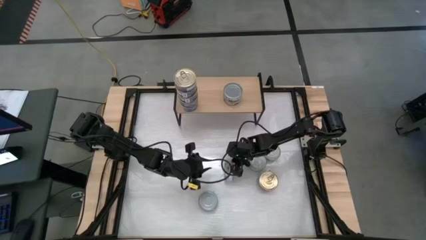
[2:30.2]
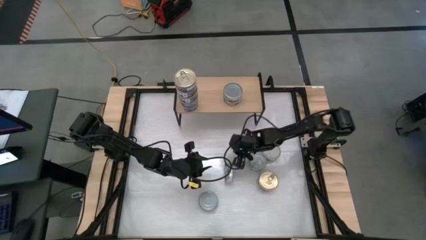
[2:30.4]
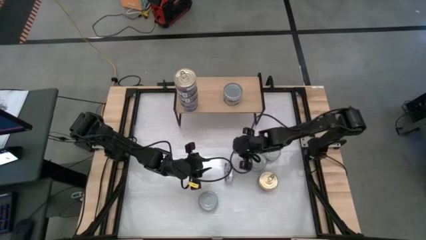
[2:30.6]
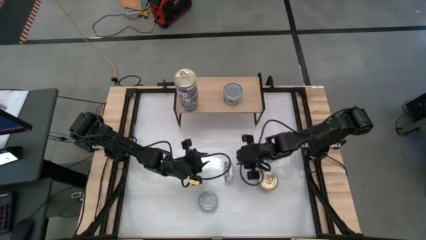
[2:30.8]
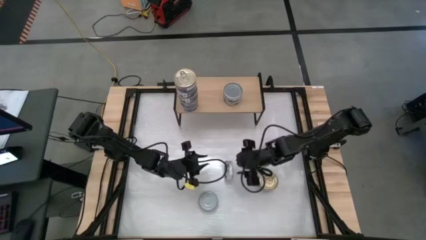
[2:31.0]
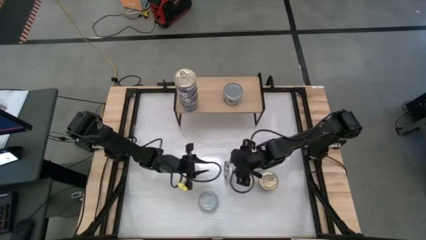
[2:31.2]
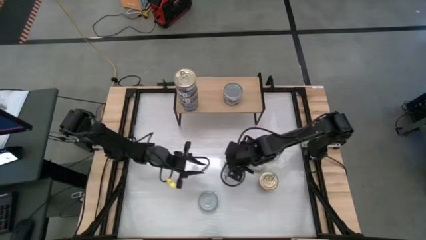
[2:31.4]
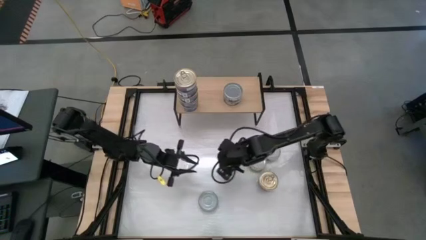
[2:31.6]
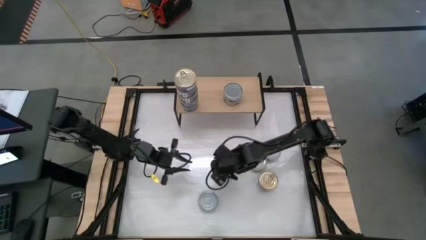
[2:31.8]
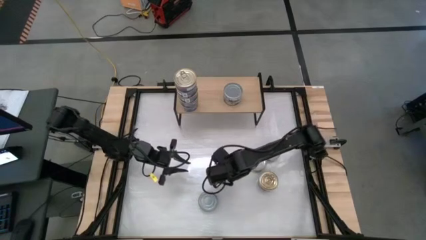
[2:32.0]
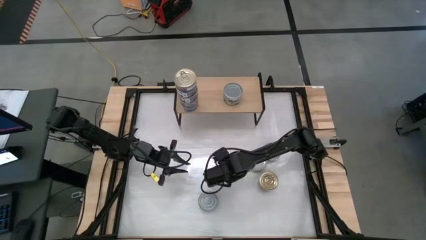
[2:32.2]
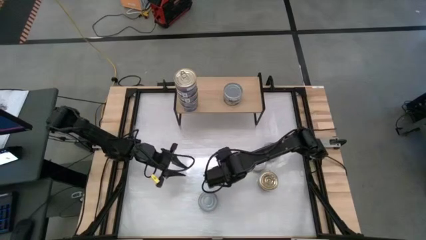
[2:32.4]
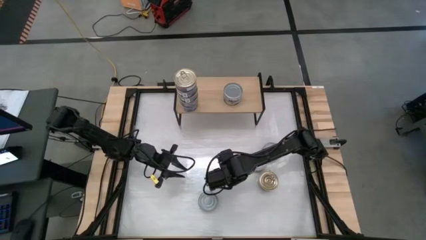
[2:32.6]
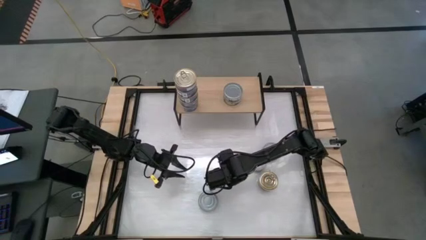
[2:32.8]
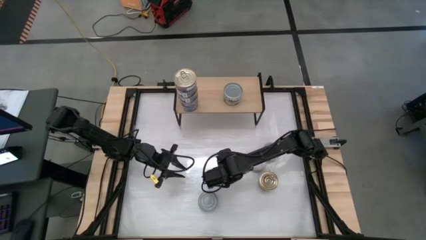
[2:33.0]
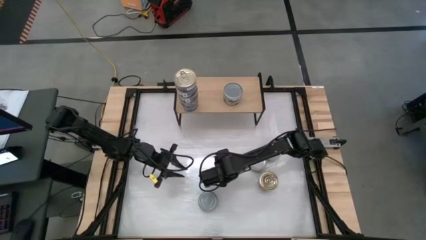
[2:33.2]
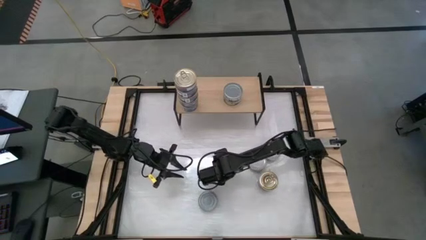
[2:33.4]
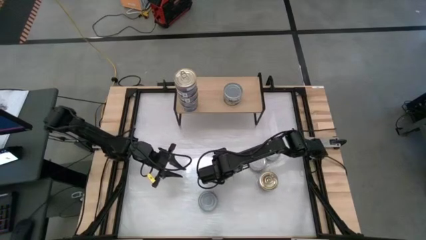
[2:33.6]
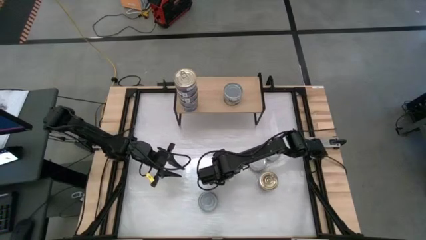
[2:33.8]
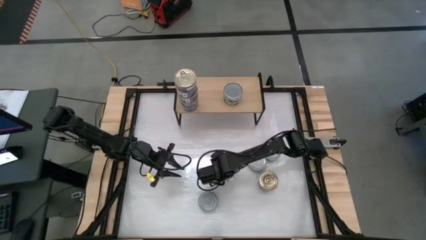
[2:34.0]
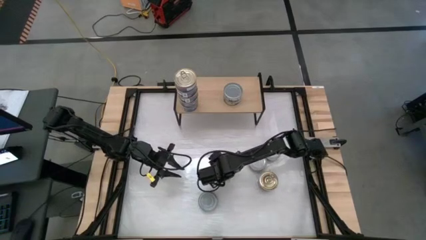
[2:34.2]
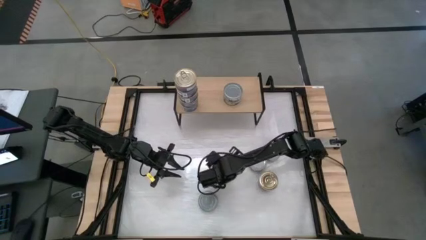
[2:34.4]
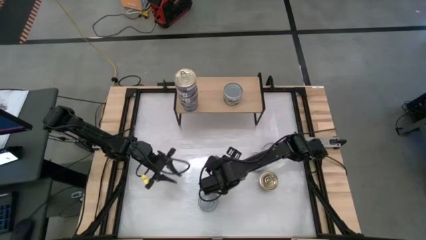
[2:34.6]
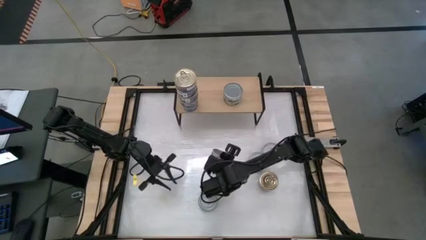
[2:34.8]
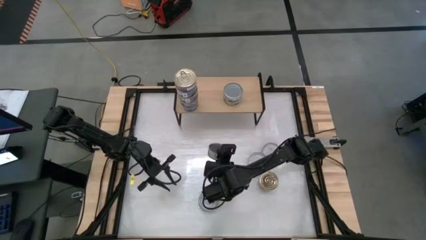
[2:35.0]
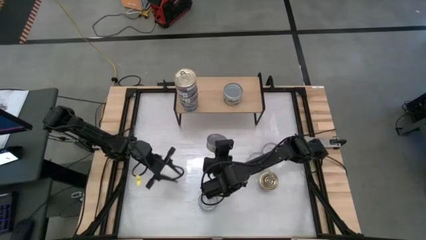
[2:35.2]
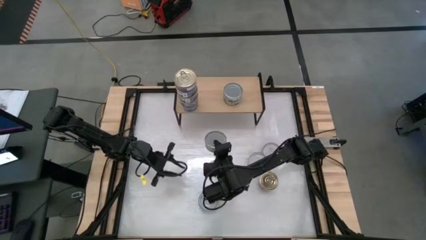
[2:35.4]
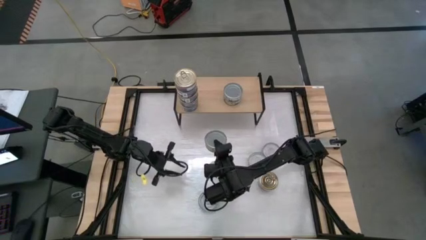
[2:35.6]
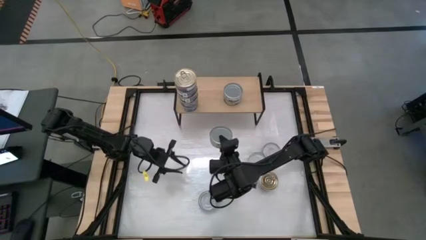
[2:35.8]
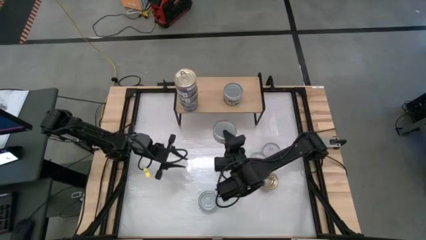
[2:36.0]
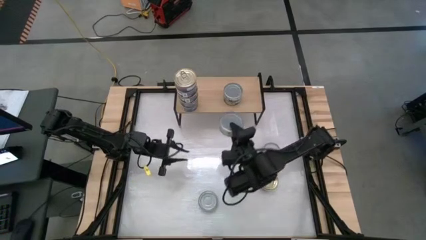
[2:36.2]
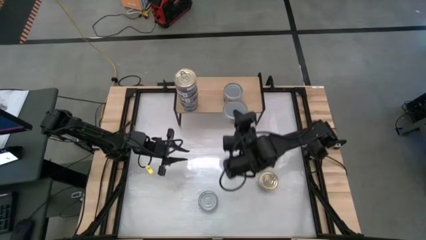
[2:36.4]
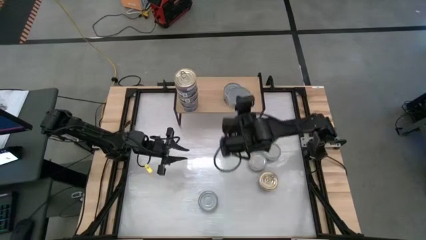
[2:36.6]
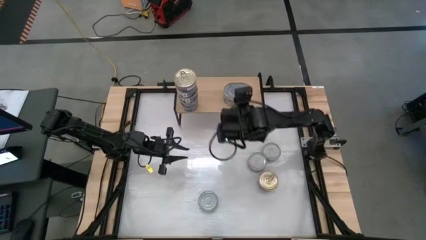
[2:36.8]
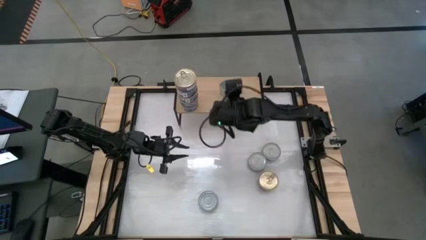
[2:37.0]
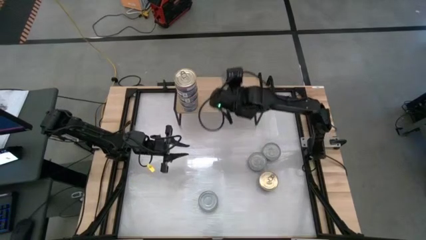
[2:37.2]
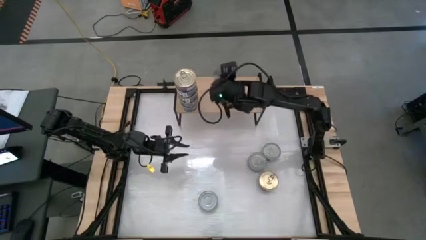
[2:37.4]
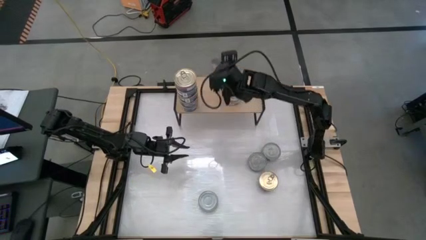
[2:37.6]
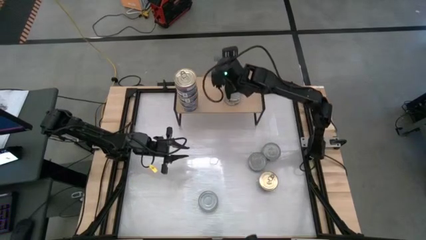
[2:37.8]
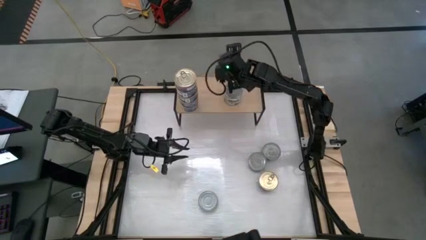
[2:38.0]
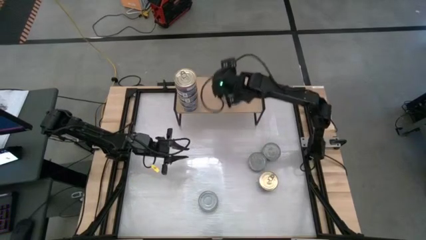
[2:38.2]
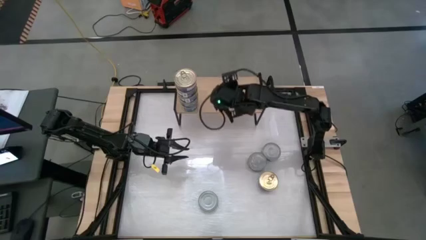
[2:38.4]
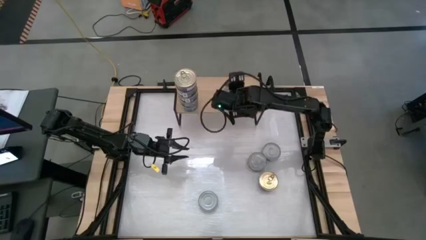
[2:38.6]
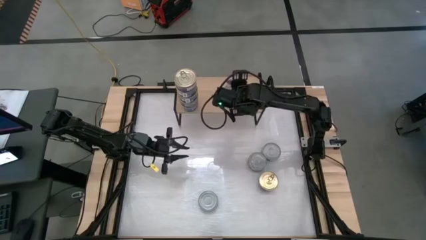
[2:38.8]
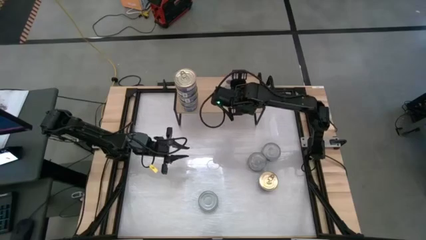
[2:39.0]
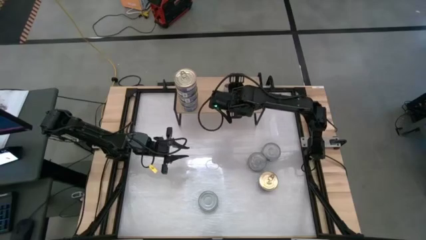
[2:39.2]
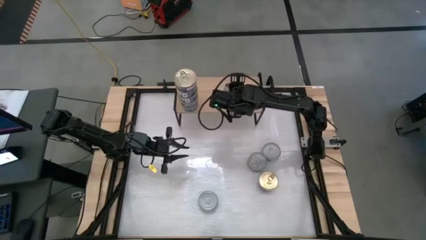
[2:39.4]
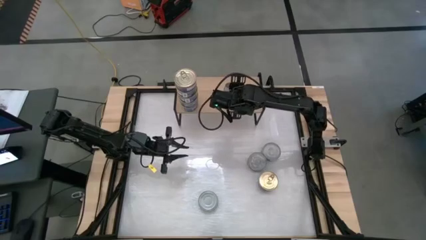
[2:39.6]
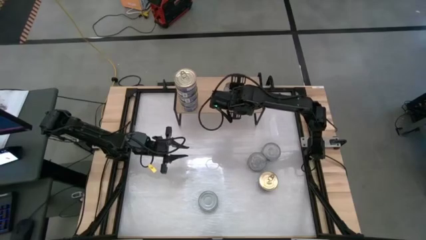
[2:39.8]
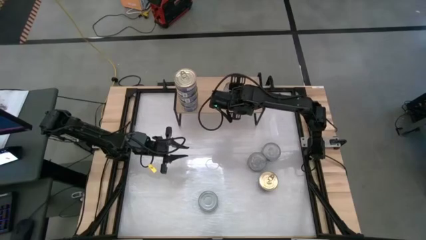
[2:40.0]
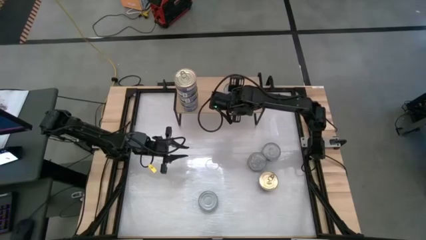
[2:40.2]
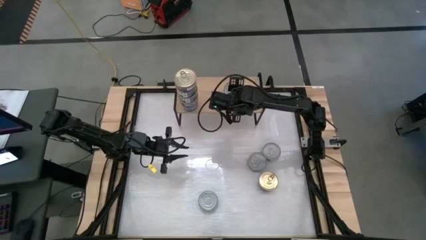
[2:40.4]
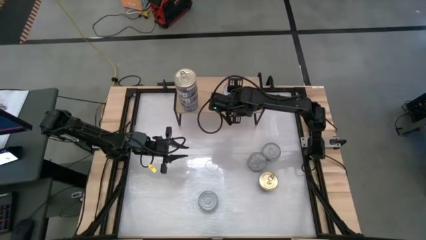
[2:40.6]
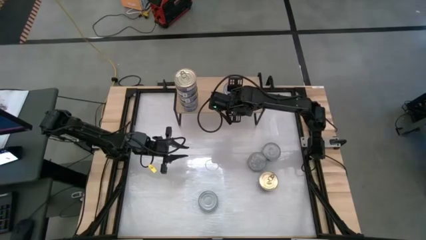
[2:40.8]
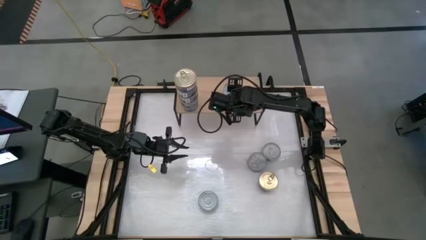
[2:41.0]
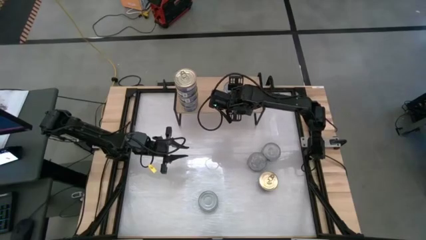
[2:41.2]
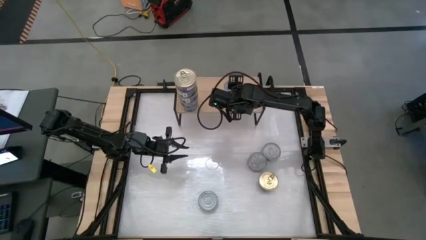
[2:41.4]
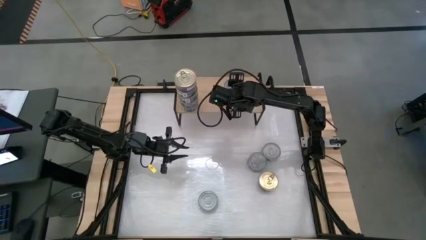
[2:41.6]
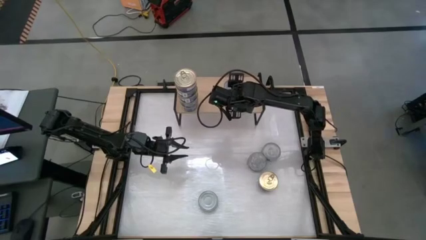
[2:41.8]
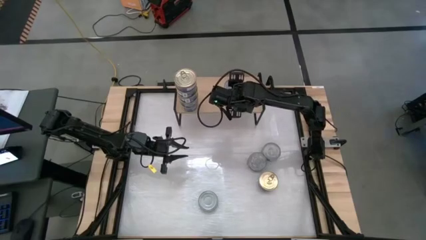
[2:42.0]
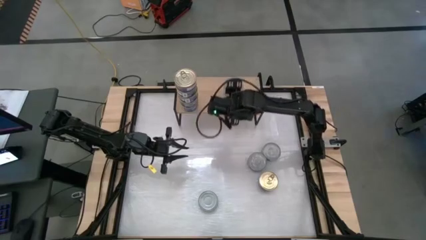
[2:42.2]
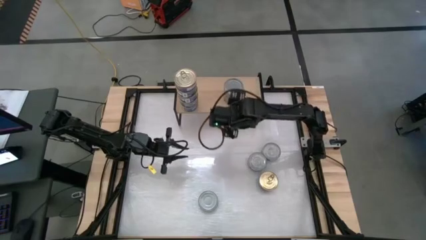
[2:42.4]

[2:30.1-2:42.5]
Task: Stack canned seafood by type on shelf
Stack the green tuna can on top of the other green tuna cans on the shelf

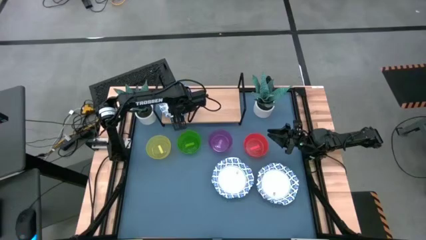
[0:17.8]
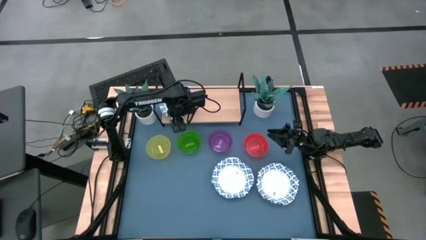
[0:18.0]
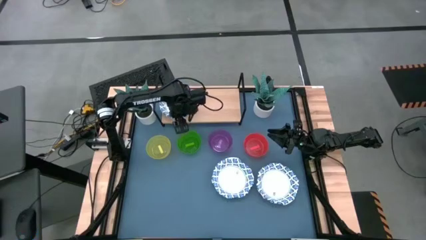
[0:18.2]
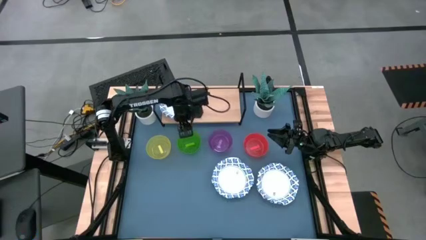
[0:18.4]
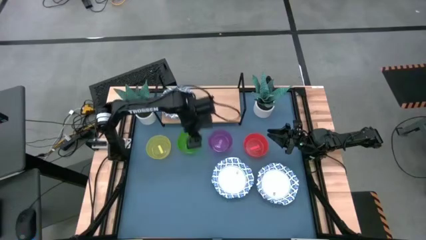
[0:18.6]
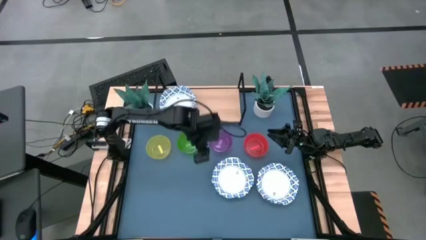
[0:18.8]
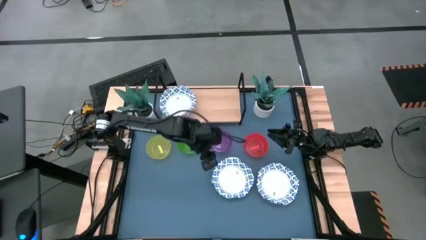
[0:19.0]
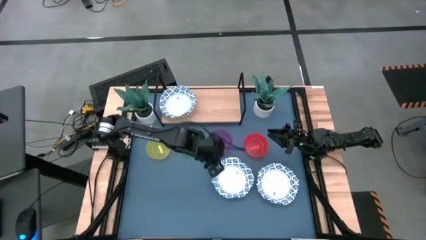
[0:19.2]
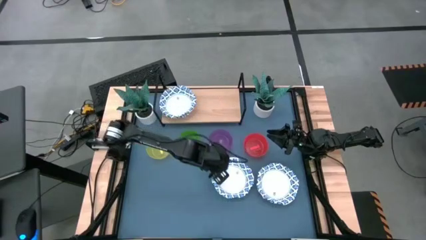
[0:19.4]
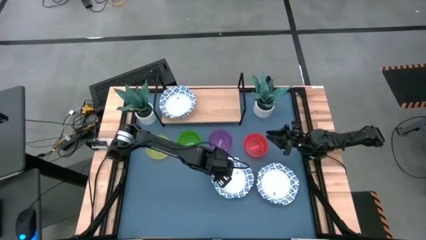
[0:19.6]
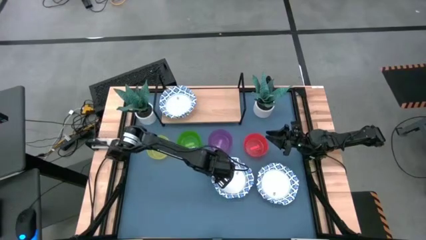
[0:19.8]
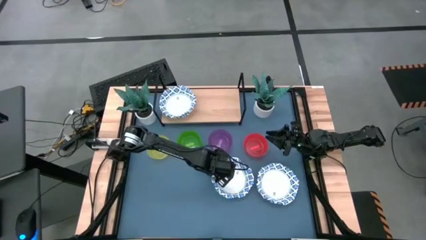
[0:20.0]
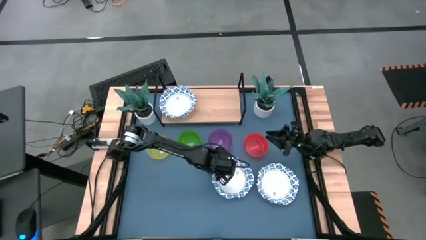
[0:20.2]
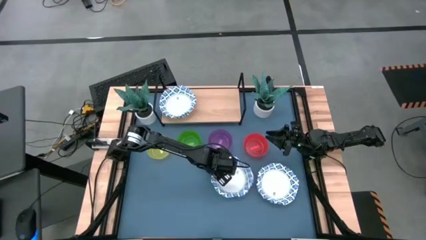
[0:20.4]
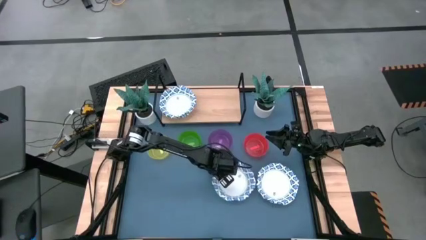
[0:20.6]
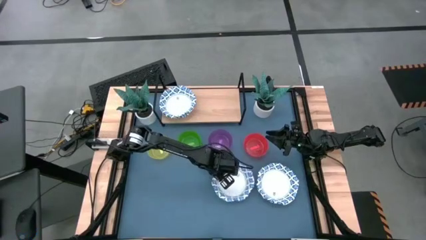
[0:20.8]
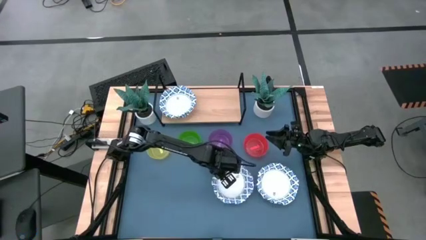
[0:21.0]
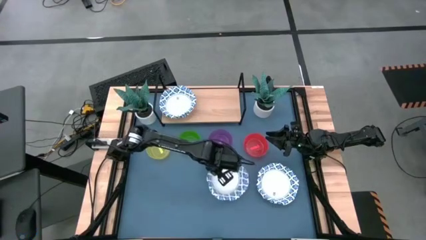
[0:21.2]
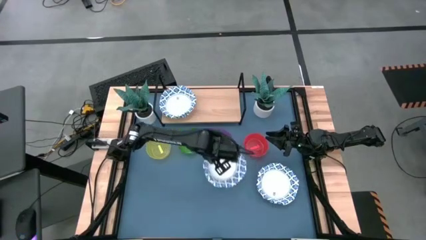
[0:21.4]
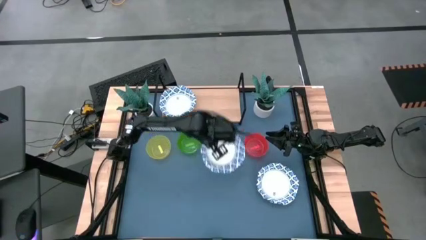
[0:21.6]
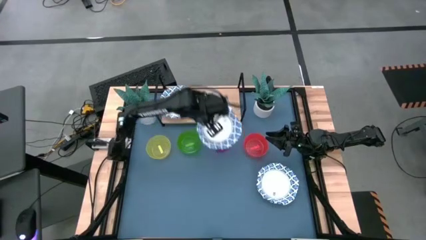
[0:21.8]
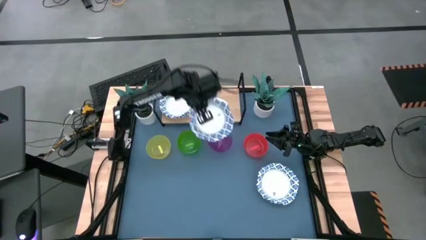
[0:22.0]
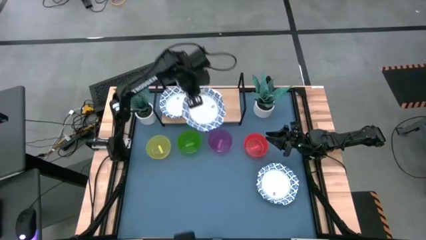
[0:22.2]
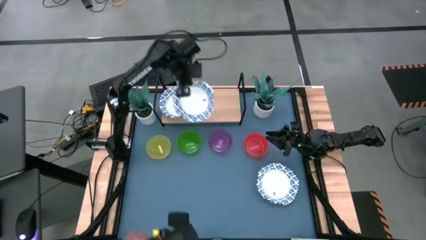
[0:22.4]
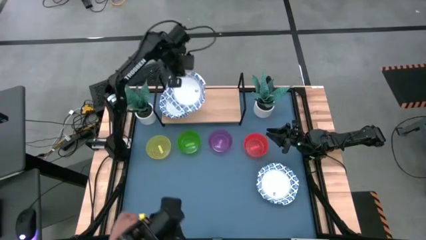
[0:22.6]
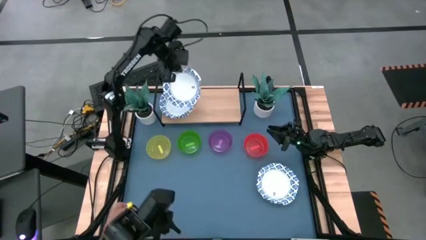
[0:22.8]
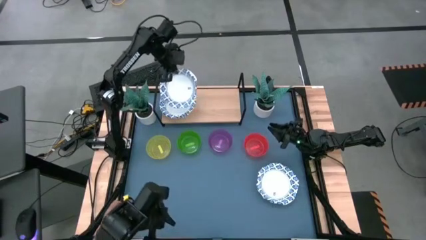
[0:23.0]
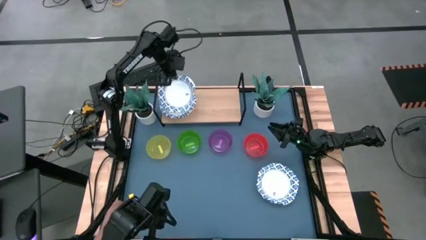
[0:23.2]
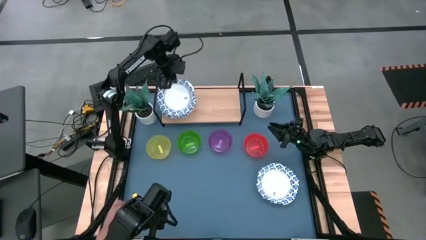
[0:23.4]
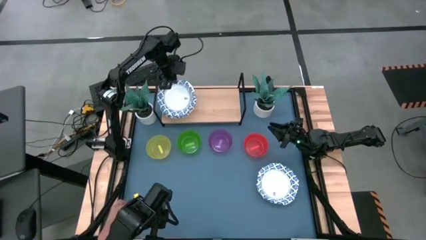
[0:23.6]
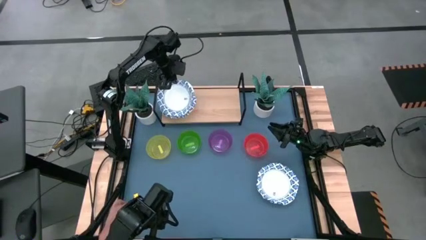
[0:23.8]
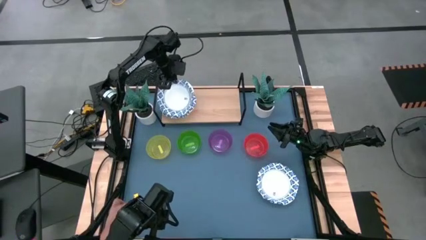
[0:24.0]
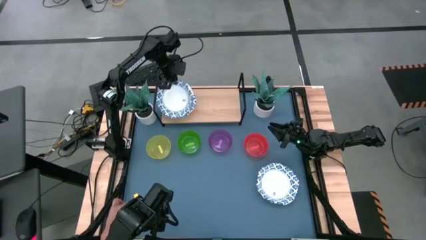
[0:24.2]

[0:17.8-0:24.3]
Task: Place and stack bowls onto a shelf
Stack the white bowl on the top of the other white bowl
